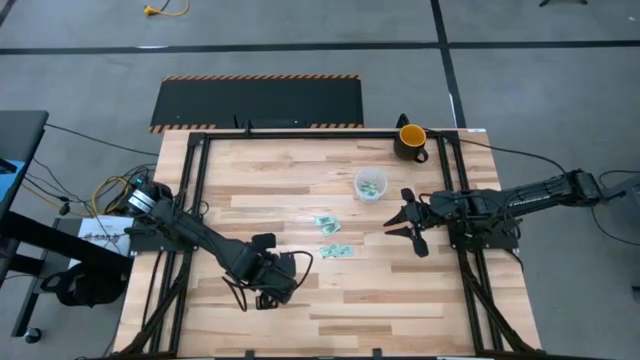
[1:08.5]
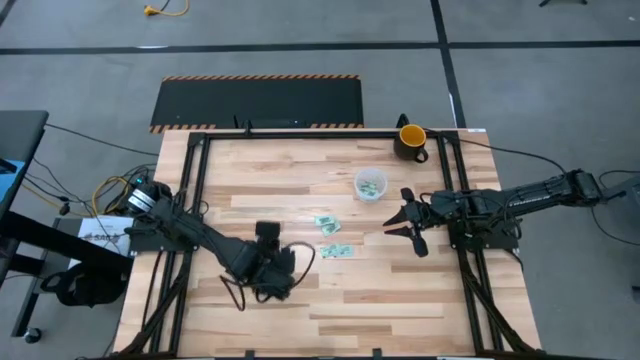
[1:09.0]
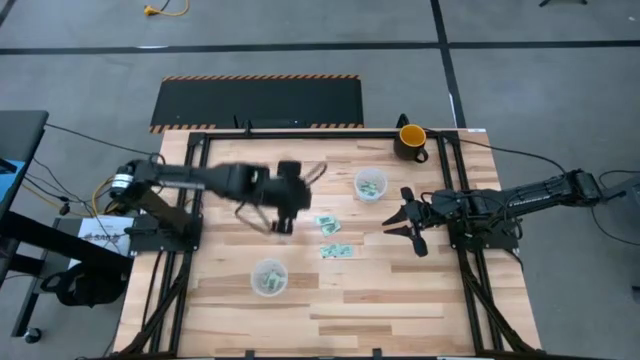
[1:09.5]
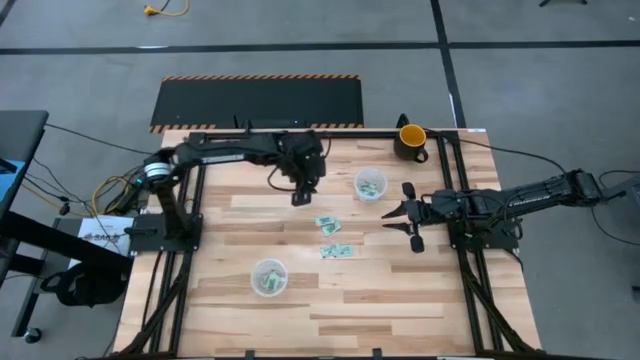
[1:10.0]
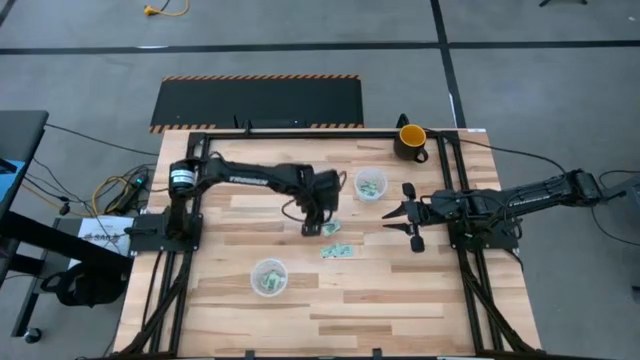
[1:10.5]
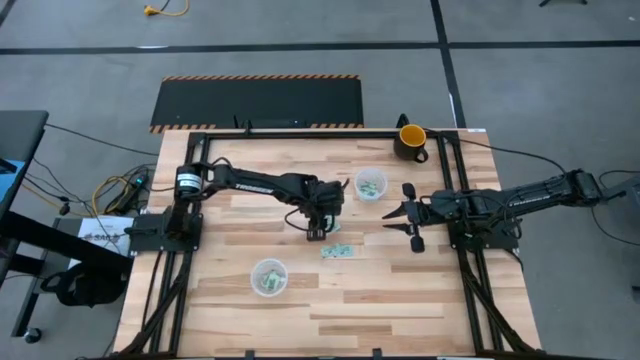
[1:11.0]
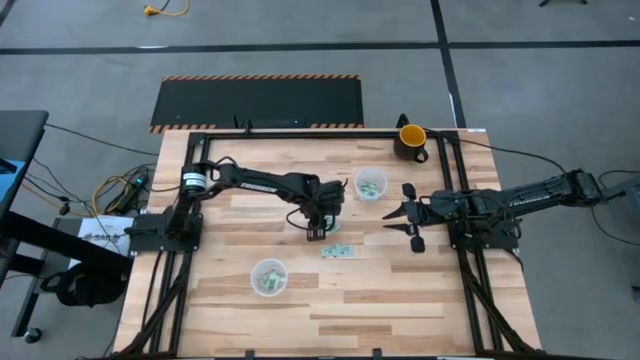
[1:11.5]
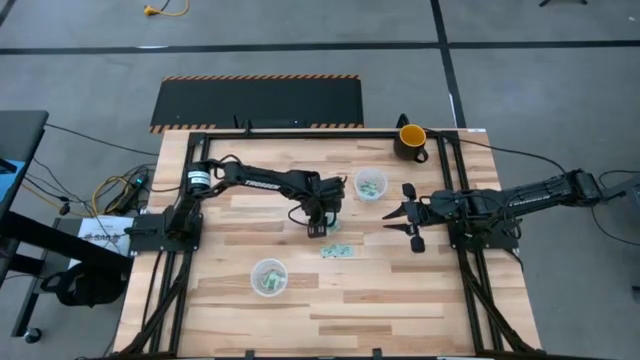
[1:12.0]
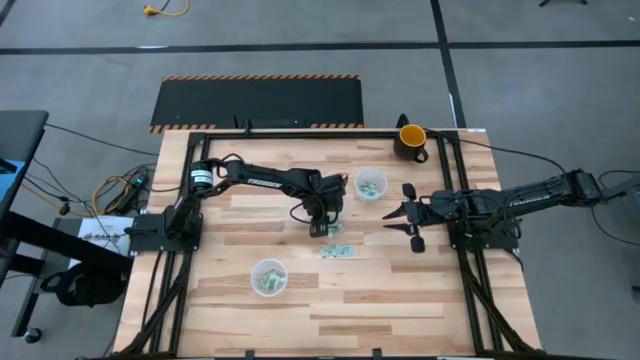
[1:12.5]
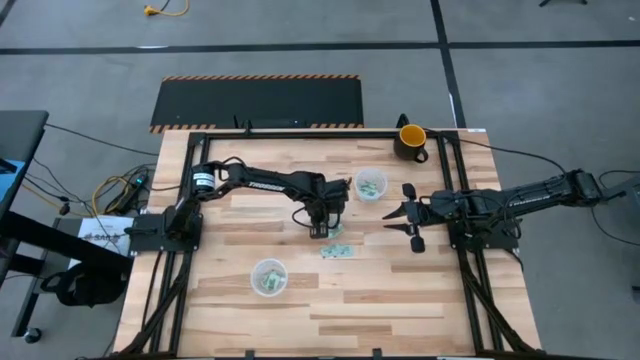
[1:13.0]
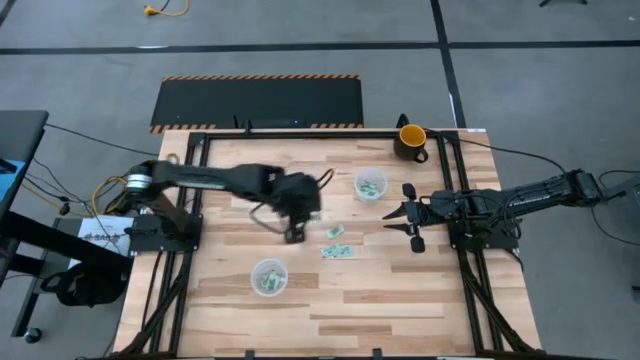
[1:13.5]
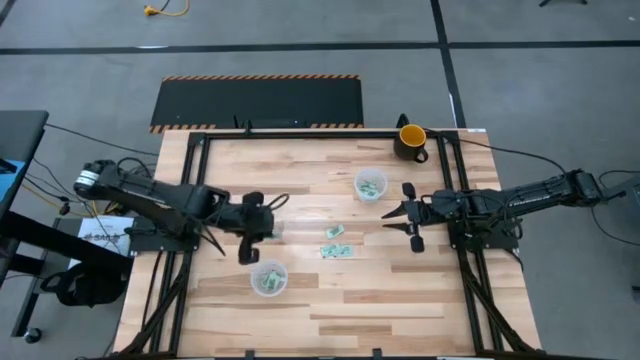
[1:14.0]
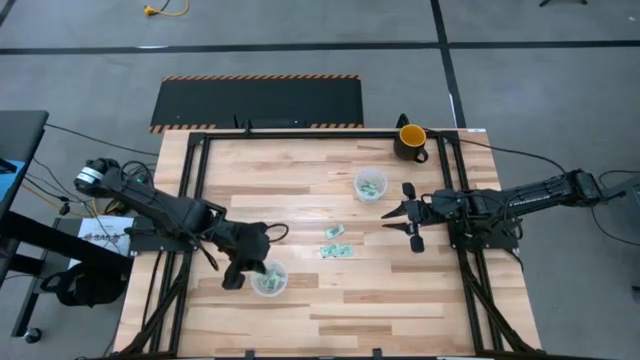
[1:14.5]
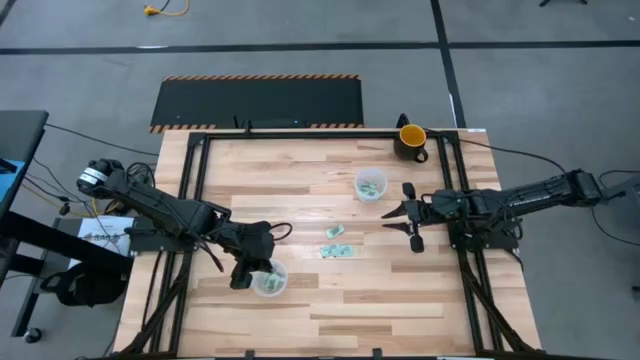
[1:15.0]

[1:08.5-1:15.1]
Task: Pick and place Stevia / Truvia into bins
Put the stevia packet into the bottom transparent container

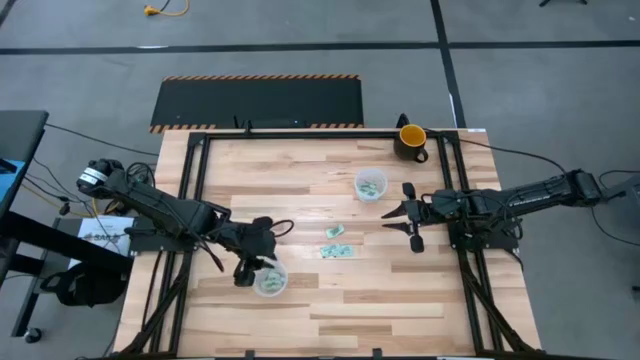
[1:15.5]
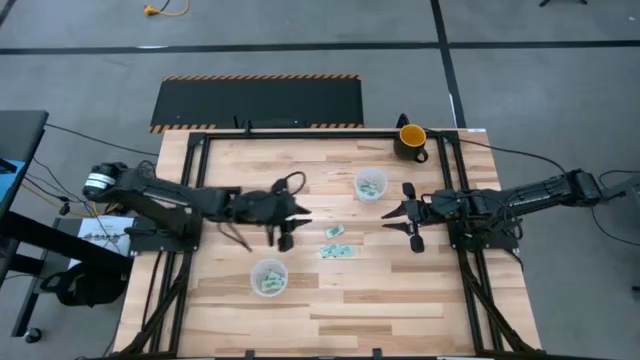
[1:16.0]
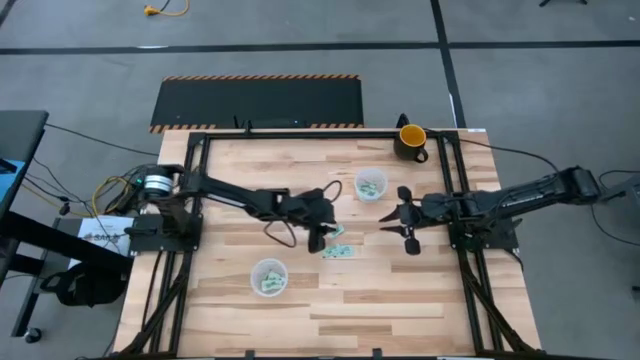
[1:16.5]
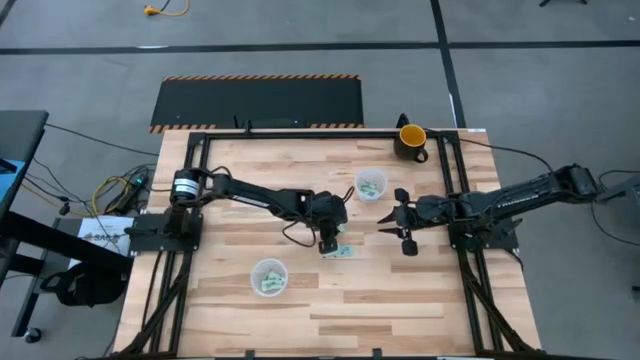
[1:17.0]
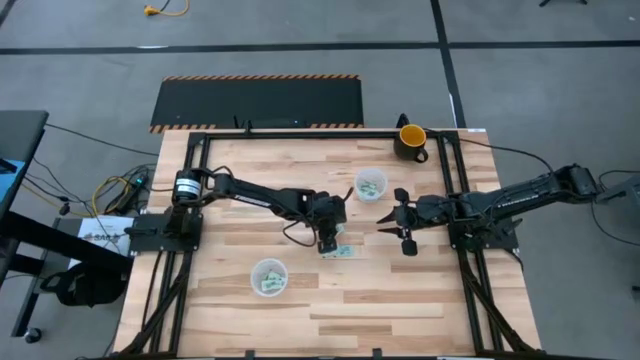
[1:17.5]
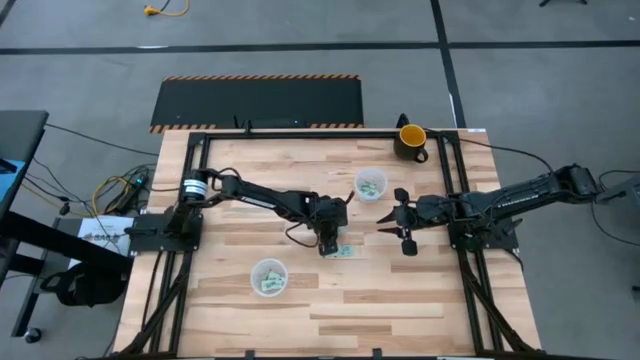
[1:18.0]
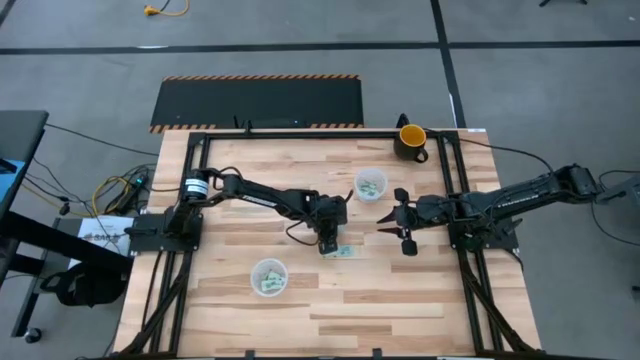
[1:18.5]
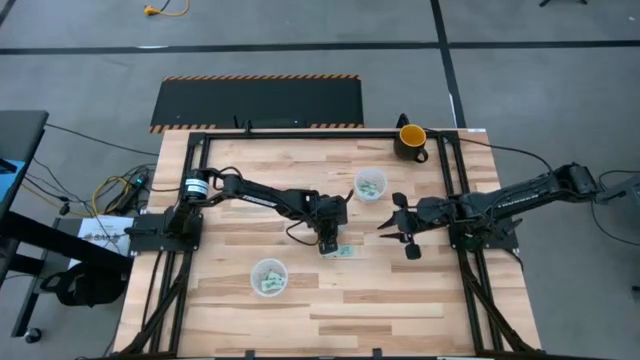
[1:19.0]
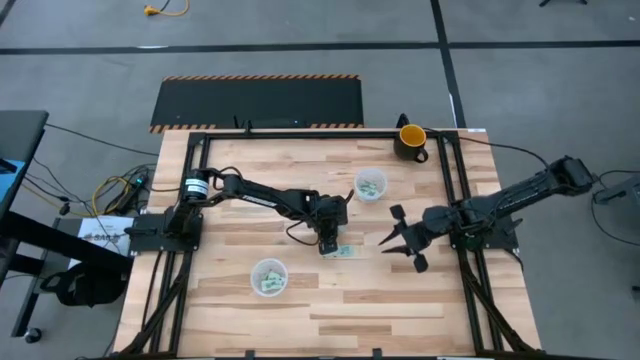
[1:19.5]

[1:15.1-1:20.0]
Put the stevia packet into the bottom transparent container

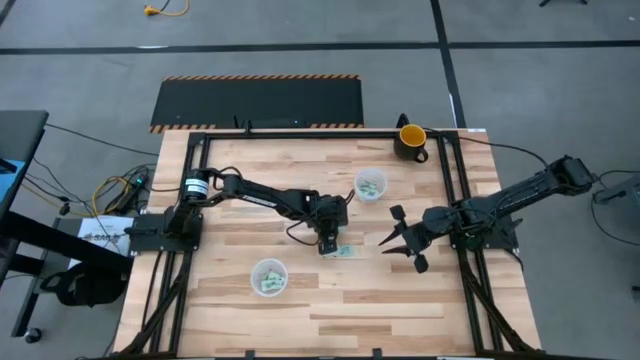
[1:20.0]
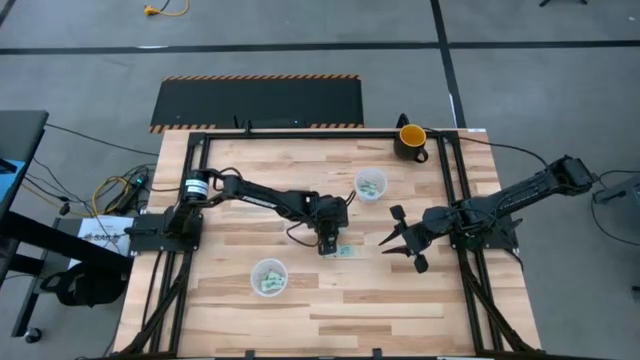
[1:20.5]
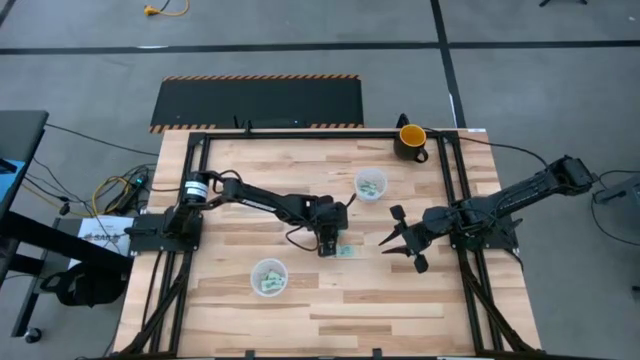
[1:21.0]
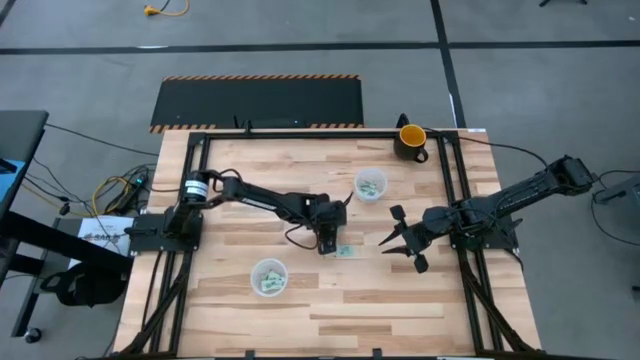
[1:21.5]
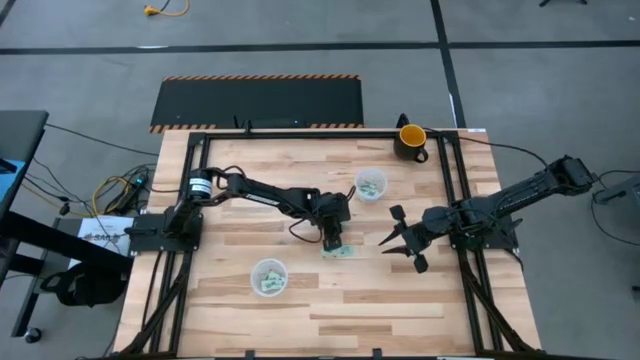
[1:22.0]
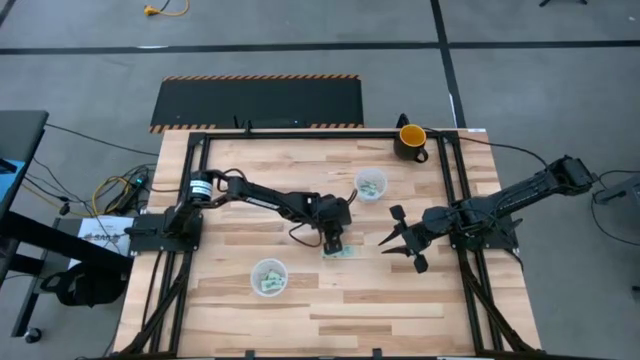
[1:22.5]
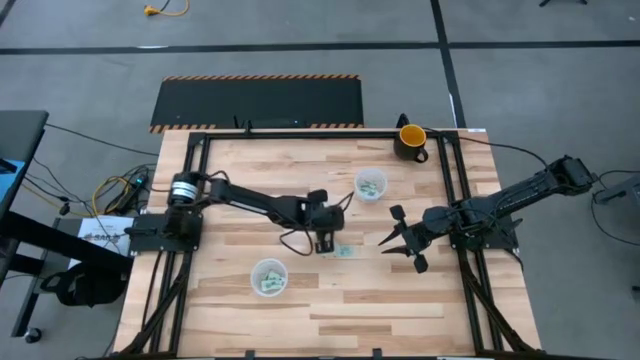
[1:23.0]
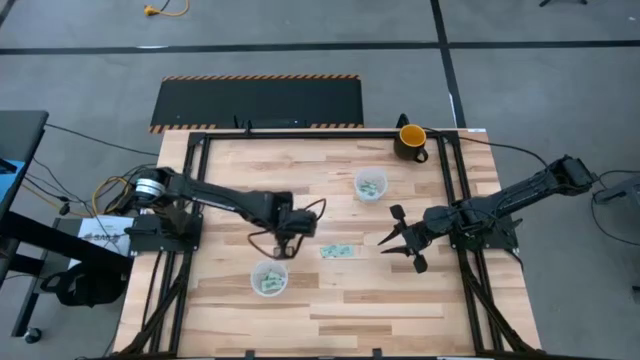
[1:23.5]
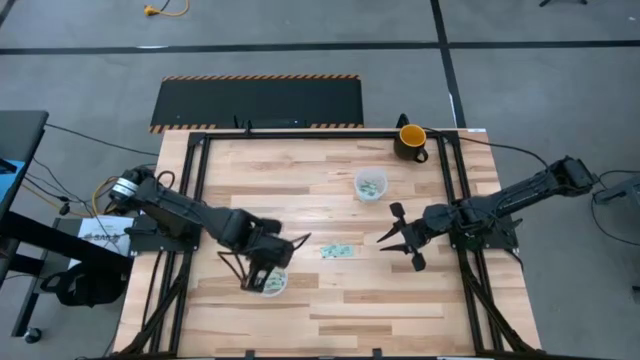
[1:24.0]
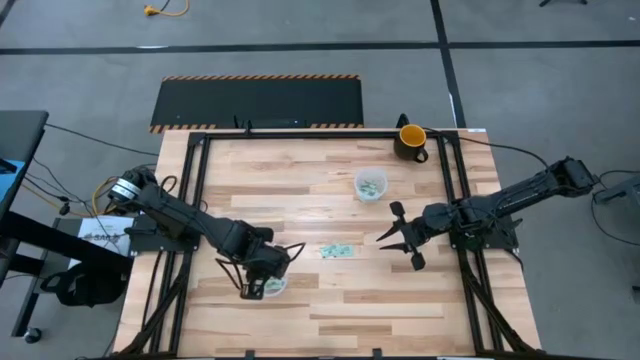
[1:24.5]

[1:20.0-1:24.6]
Put the stevia packet into the bottom transparent container

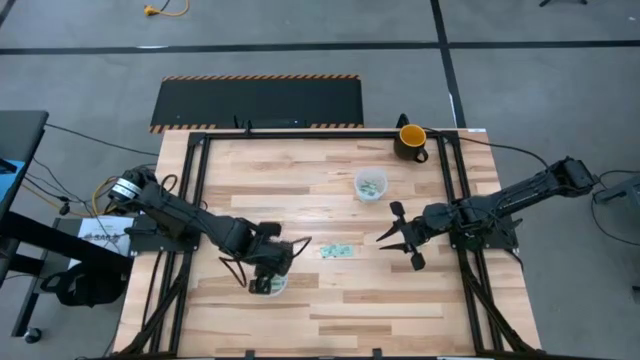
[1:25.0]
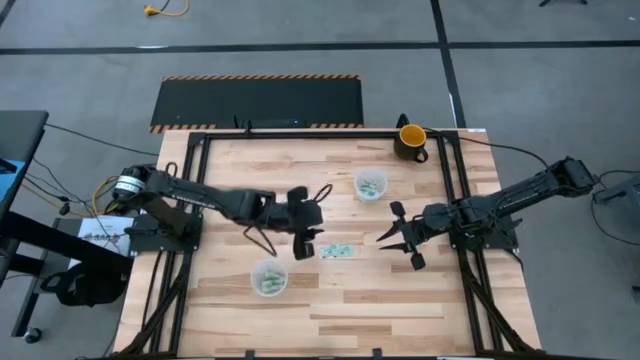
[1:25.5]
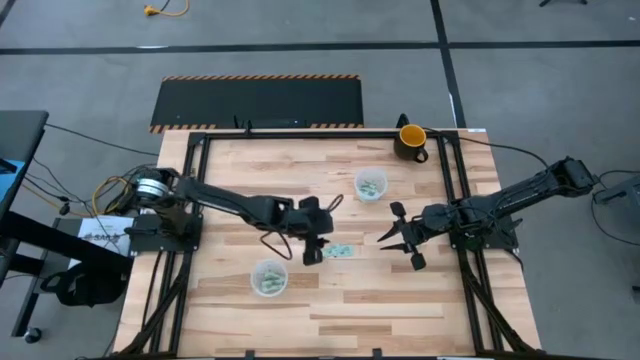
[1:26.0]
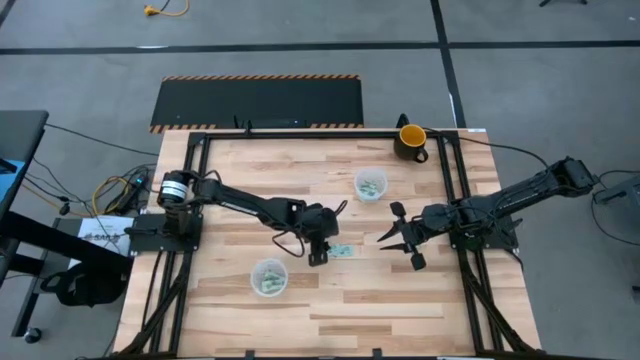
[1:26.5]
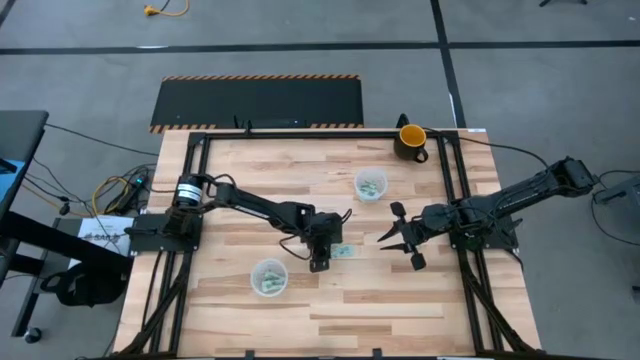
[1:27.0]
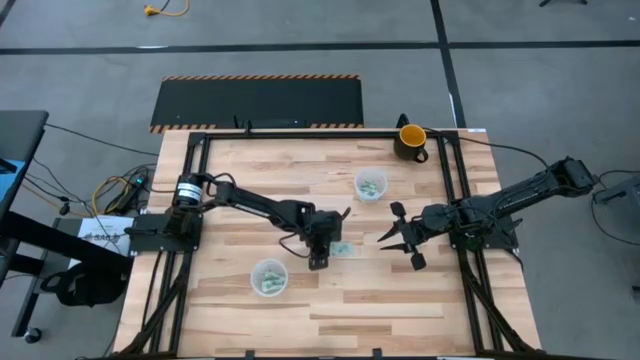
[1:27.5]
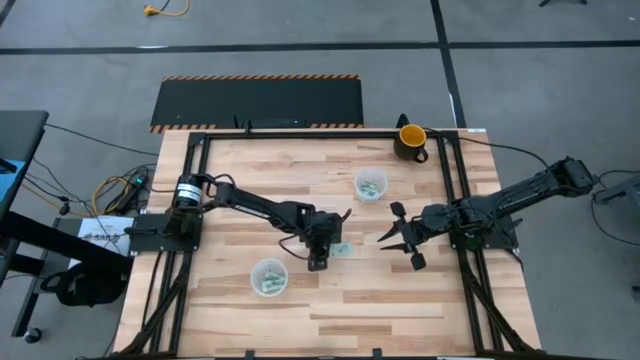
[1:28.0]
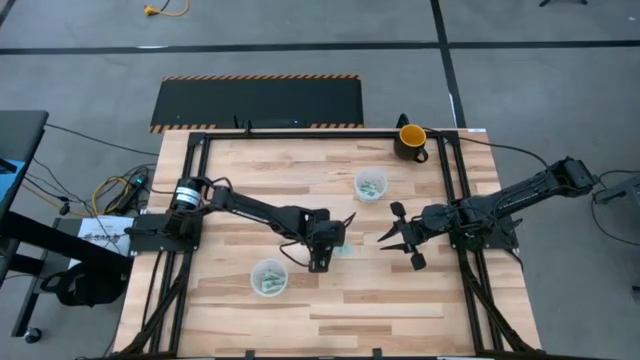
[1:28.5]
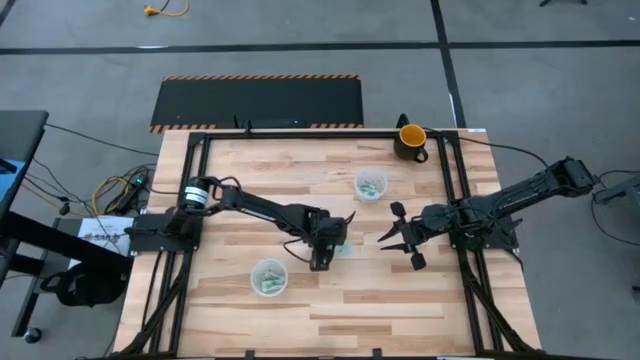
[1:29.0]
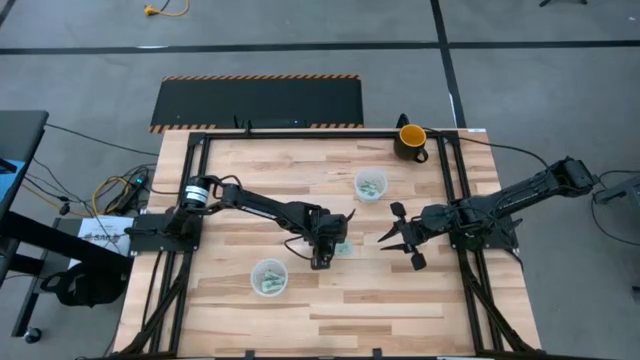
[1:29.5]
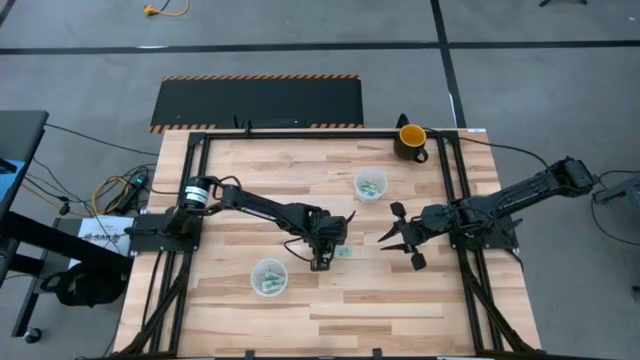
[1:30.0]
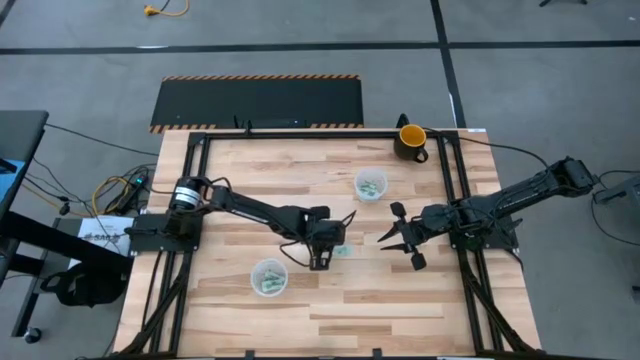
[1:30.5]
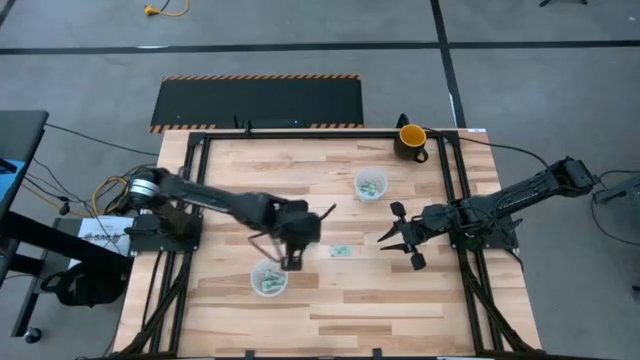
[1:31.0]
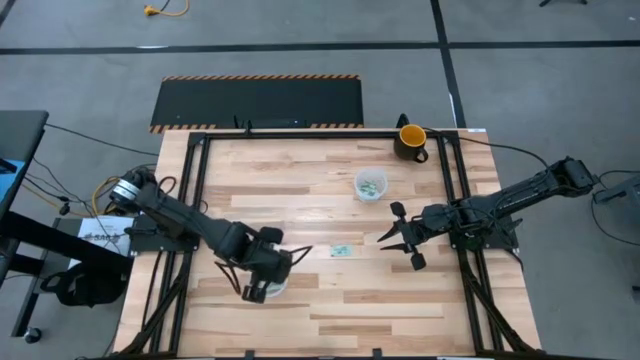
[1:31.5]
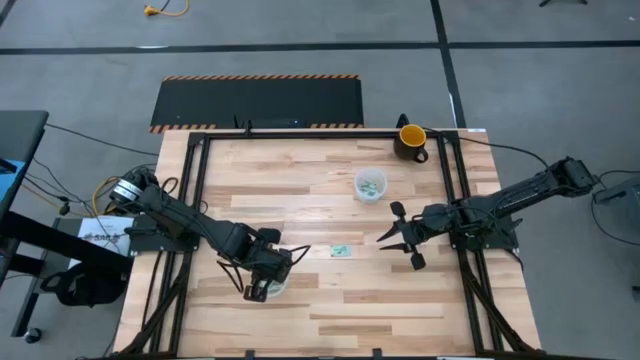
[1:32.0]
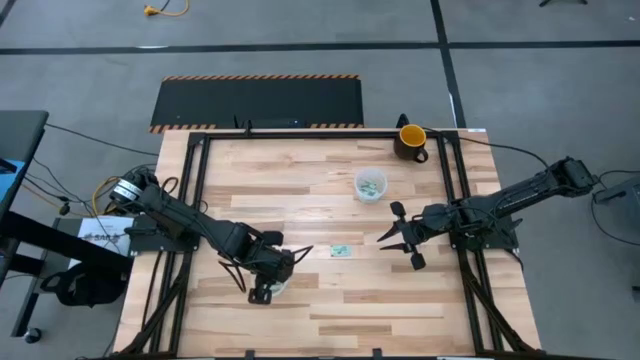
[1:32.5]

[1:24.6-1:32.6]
Put the stevia packet into the bottom transparent container
